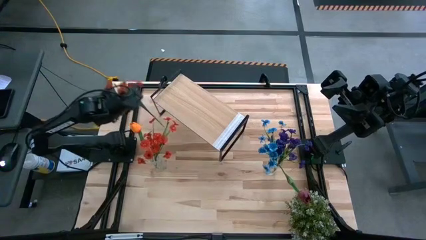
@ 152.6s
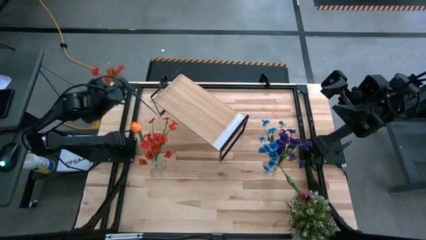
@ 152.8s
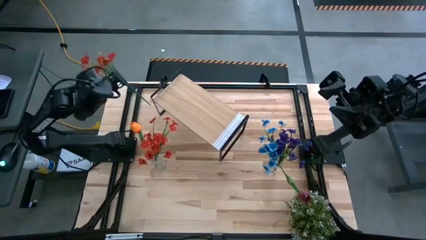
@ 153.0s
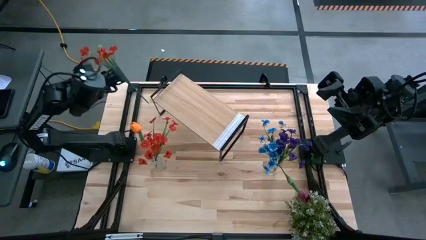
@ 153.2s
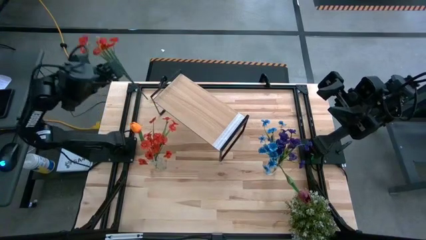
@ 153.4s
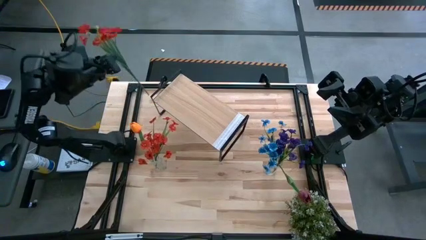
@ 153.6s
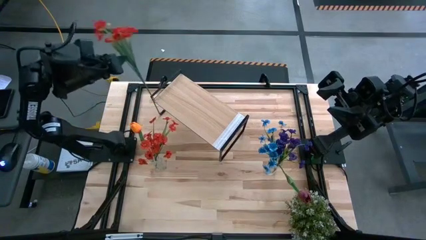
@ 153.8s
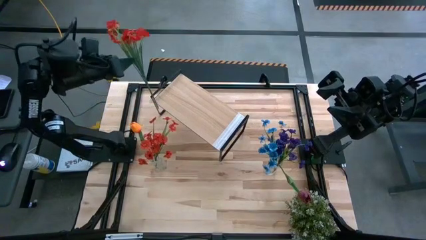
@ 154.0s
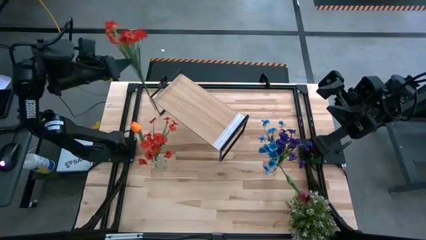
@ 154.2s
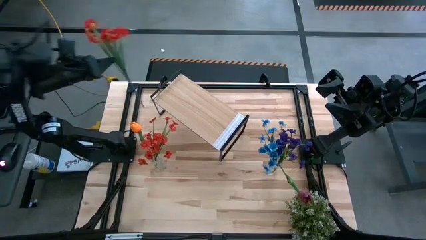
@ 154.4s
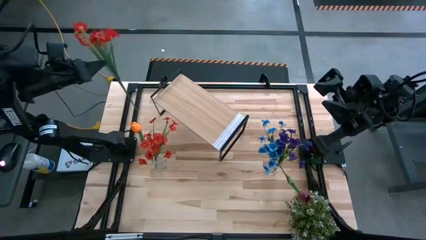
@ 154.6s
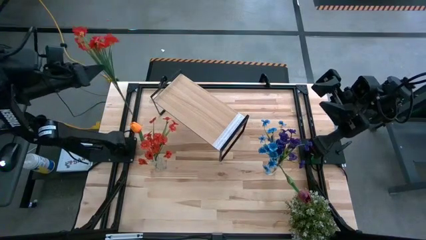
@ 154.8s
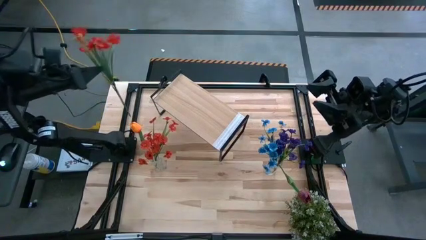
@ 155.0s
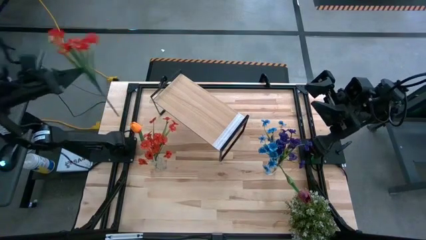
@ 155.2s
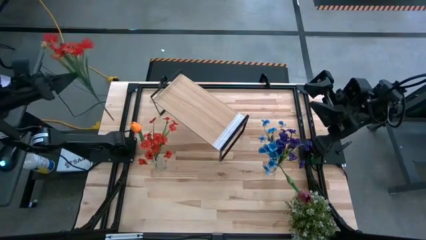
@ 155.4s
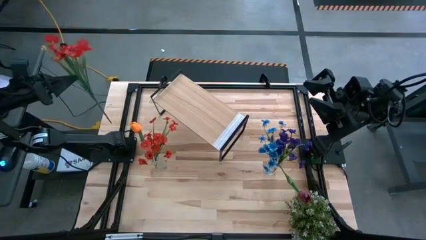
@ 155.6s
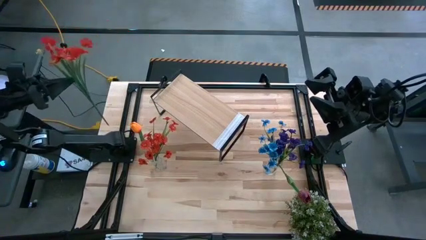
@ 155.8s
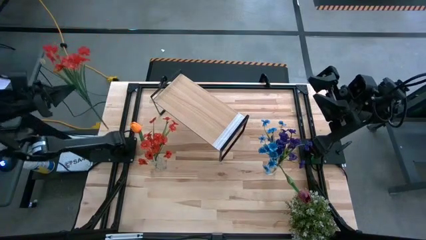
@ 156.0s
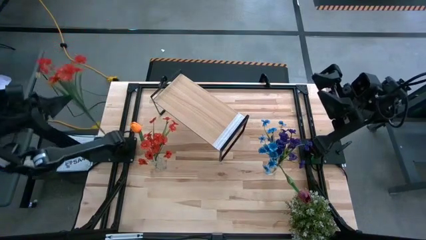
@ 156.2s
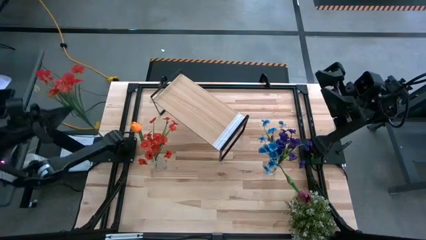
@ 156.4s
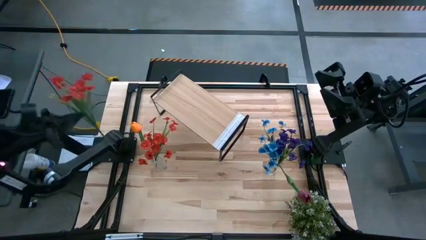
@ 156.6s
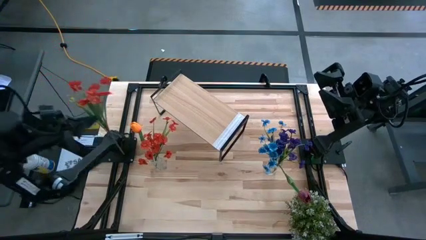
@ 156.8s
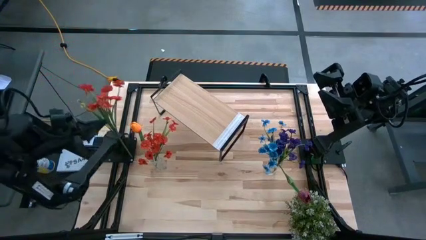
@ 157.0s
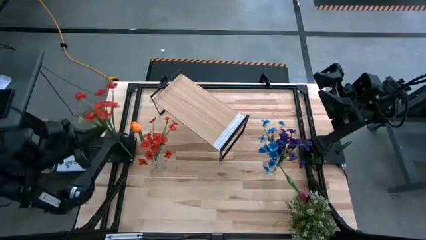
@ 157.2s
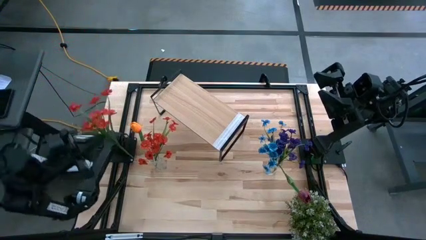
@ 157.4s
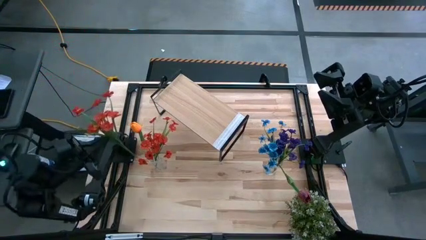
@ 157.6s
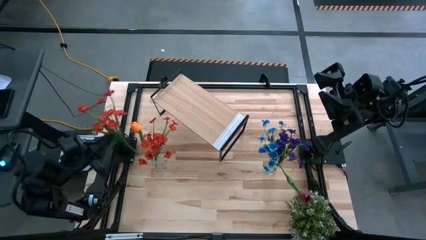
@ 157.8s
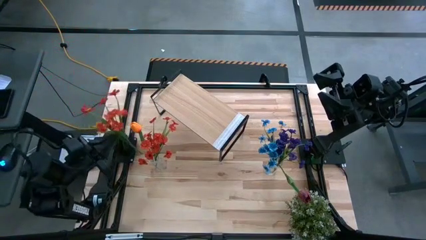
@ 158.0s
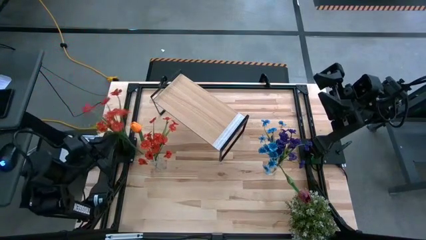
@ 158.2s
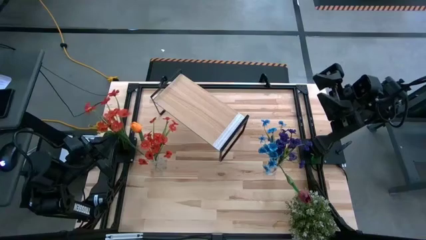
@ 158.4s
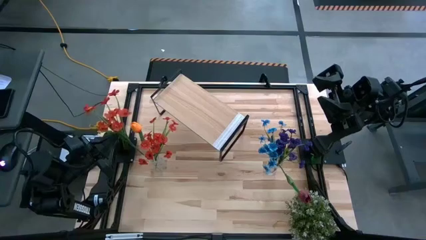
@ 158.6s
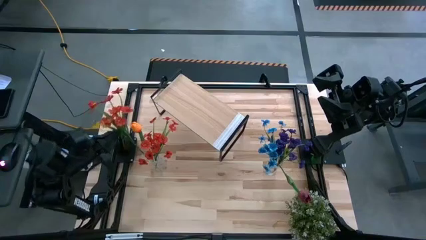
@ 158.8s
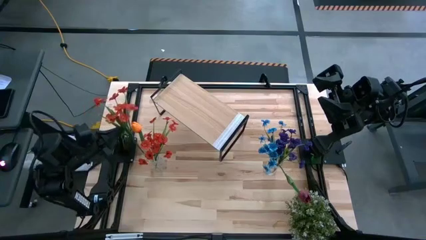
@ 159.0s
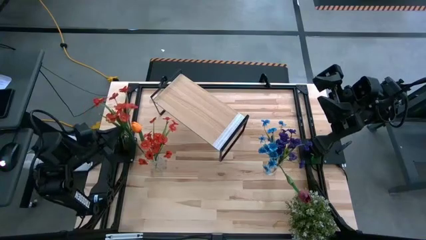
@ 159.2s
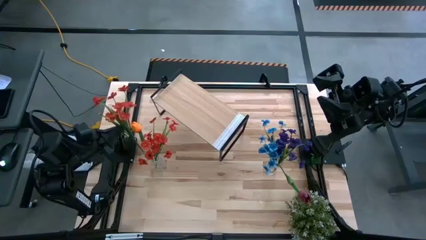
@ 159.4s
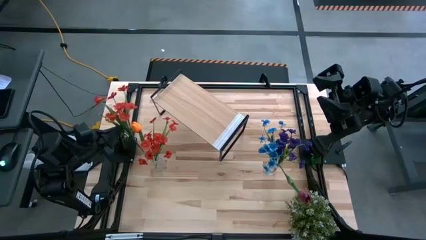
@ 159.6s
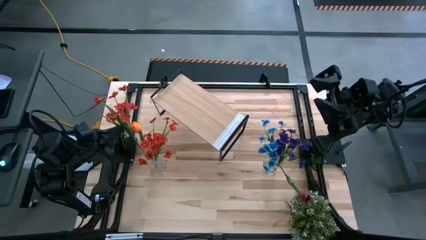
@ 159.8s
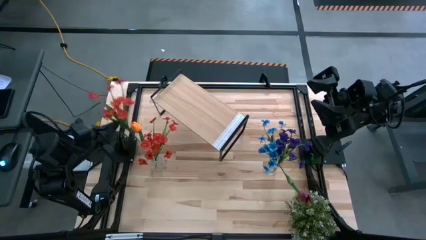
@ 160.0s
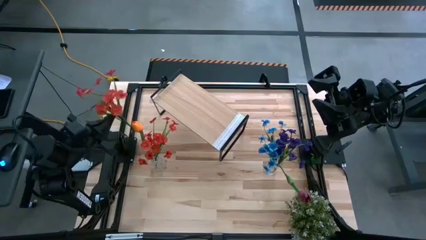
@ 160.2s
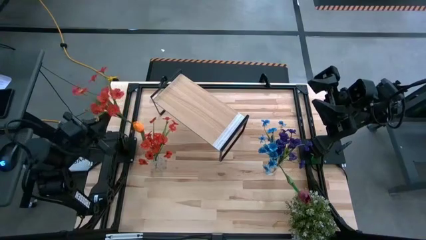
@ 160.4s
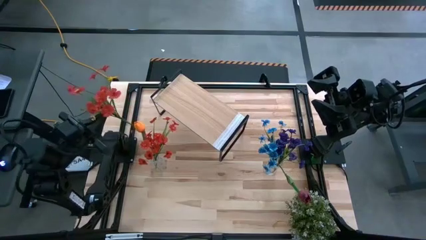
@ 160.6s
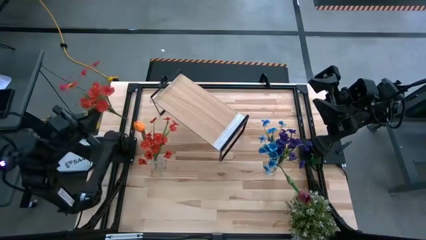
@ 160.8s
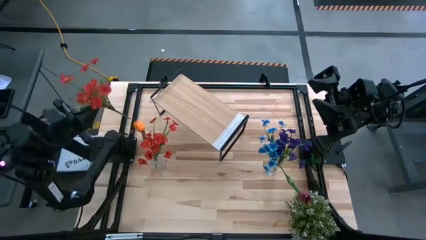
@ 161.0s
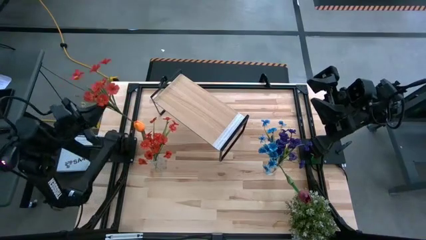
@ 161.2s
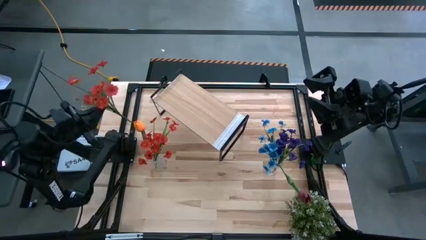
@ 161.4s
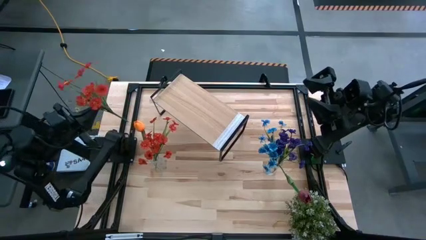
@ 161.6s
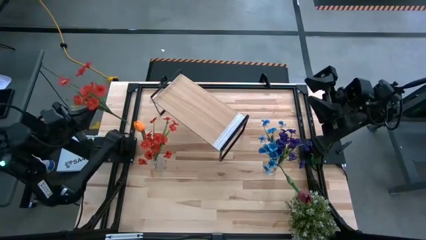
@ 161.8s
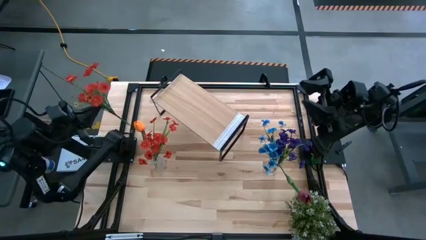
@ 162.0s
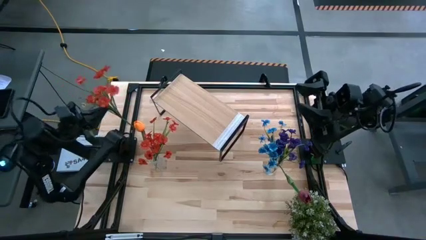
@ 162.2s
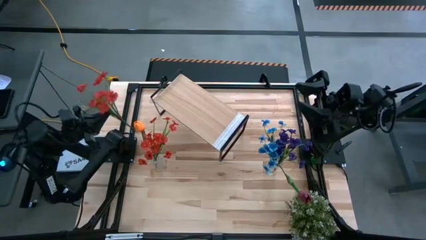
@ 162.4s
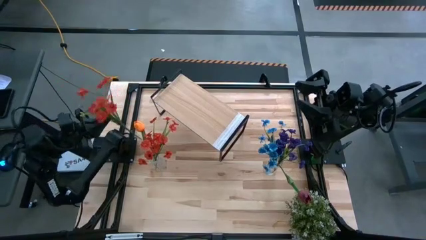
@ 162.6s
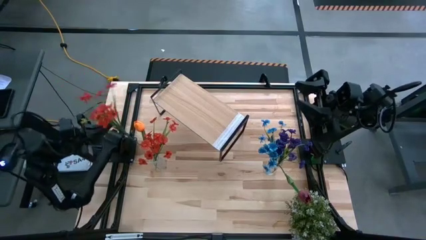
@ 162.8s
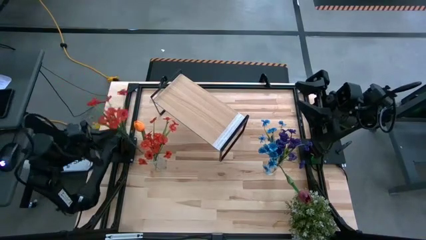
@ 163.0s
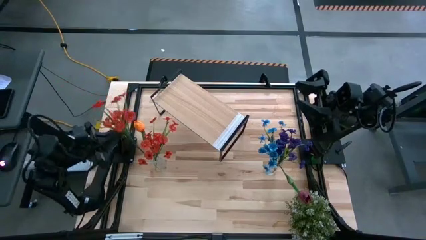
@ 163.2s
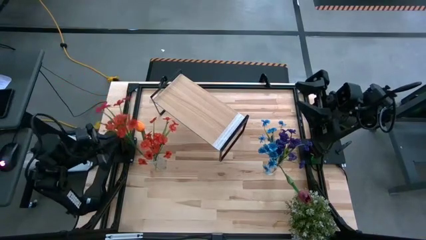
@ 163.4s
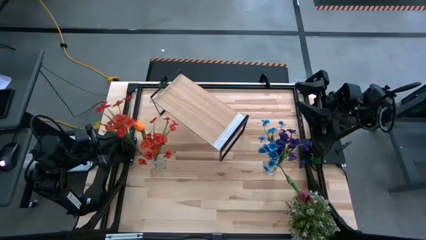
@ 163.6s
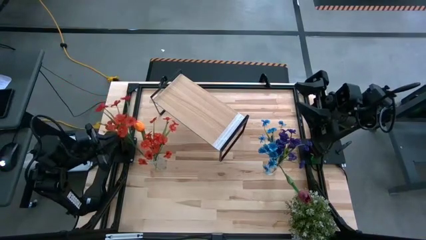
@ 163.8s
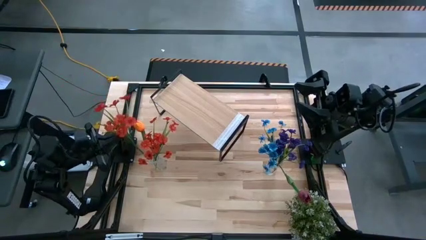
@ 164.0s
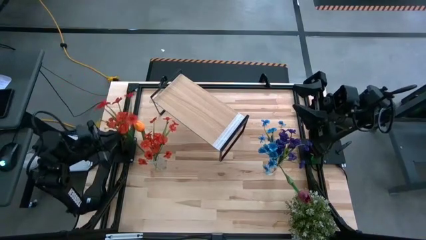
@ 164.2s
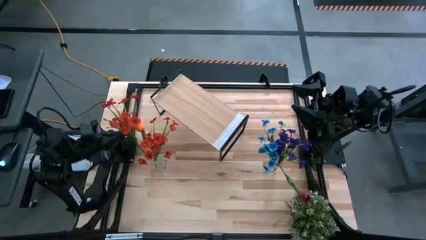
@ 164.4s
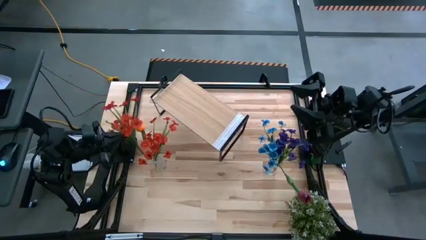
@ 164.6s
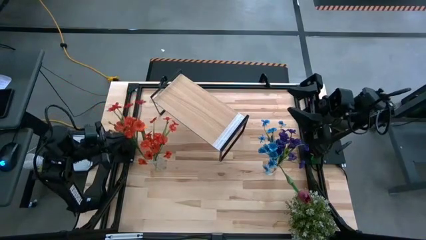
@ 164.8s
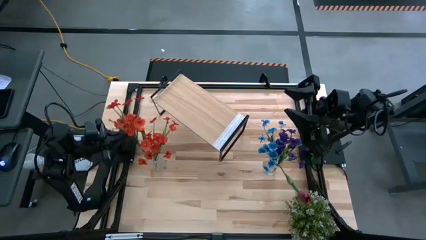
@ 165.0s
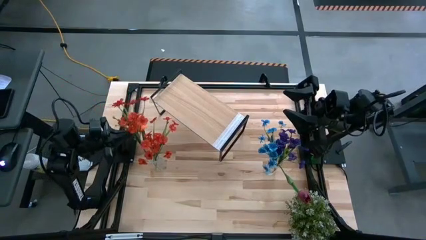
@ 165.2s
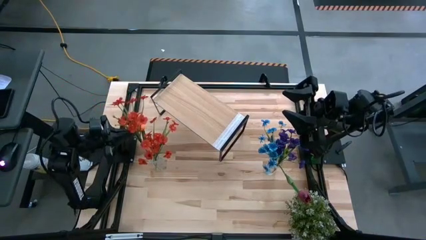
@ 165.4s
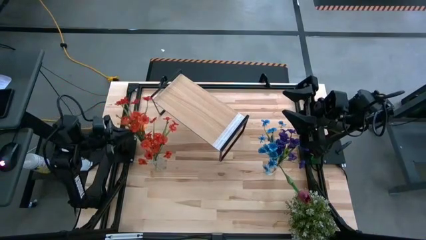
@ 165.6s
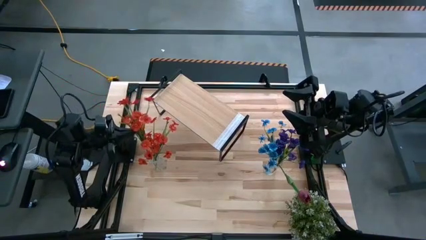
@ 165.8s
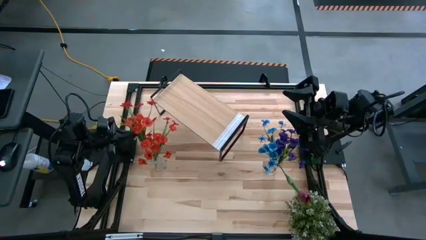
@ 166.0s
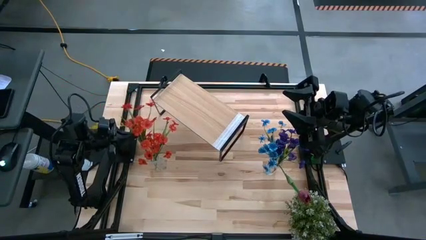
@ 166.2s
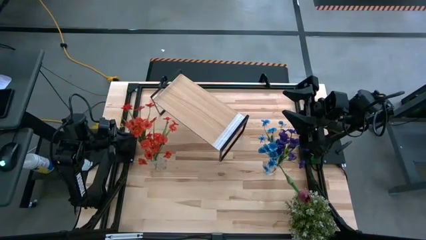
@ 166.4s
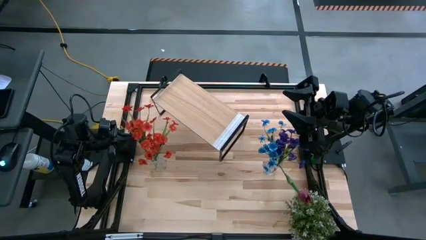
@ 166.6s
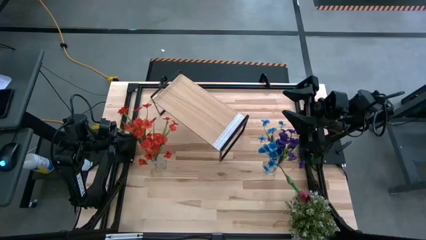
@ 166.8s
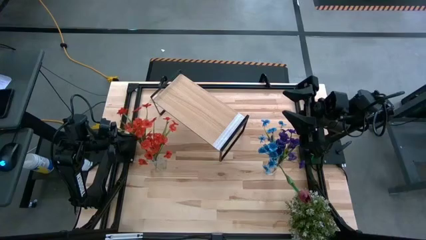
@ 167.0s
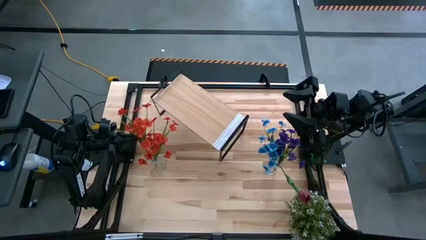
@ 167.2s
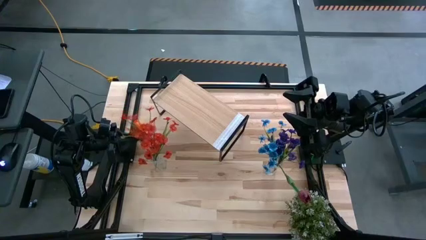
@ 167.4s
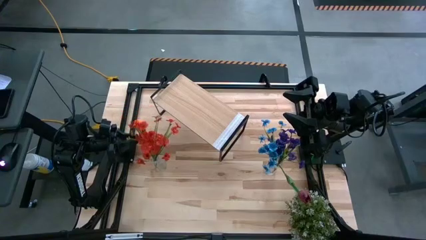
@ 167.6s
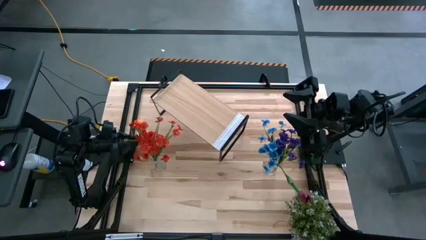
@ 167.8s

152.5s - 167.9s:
Task: Pick and place flowers into a vace then onto a shelf
Put the red flower into the left transparent vase

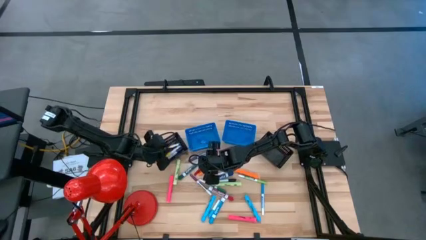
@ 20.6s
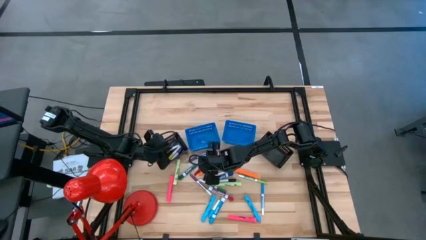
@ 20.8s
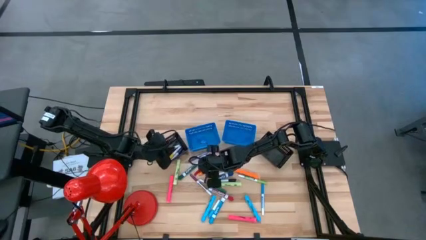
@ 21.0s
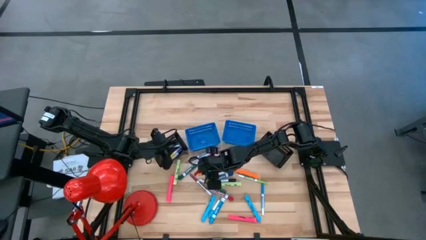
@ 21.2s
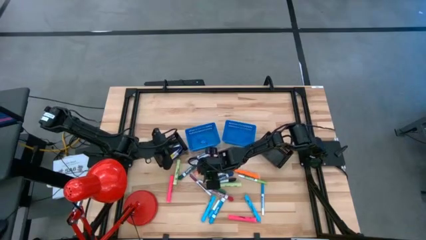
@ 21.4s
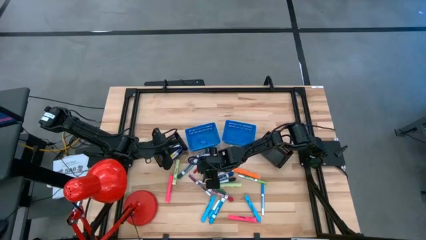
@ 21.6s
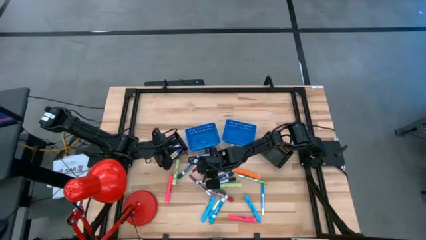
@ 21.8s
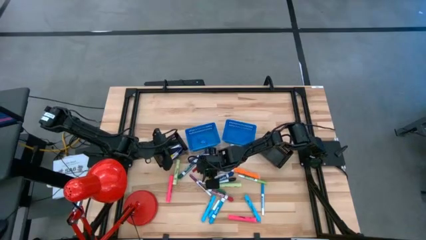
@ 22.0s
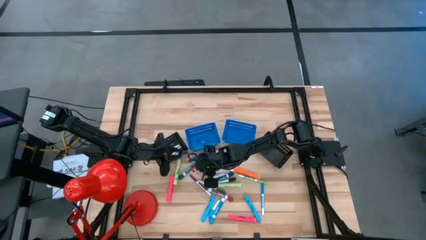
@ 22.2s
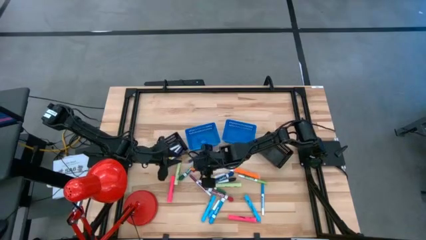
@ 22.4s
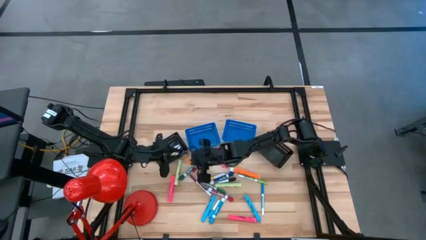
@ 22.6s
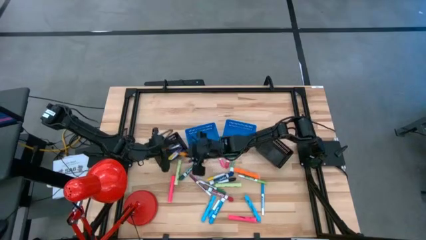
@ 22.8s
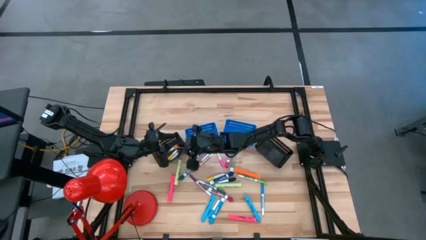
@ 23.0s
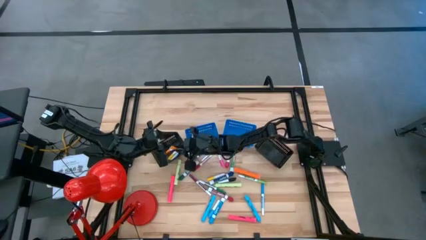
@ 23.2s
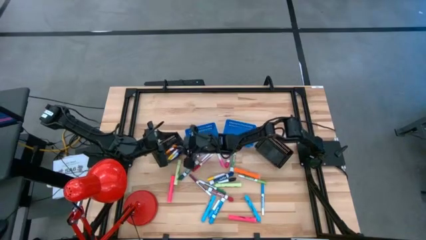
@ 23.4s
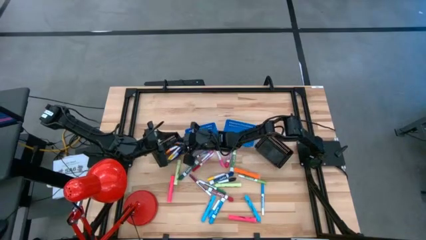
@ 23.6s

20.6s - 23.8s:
Task: Pick & Place Markers
Put the orange water marker into the left black bin
